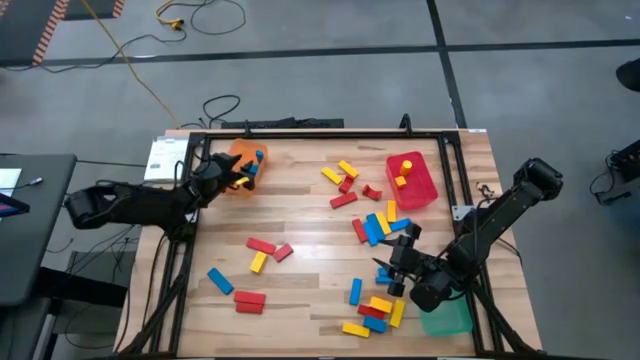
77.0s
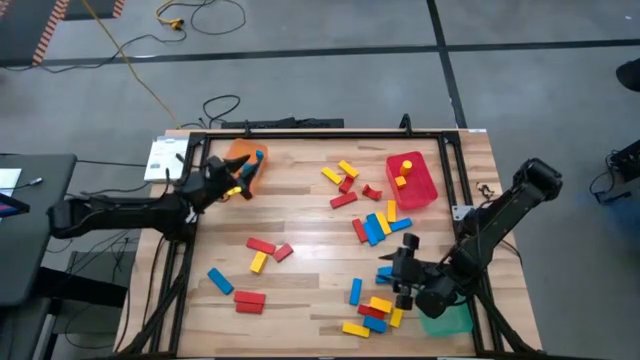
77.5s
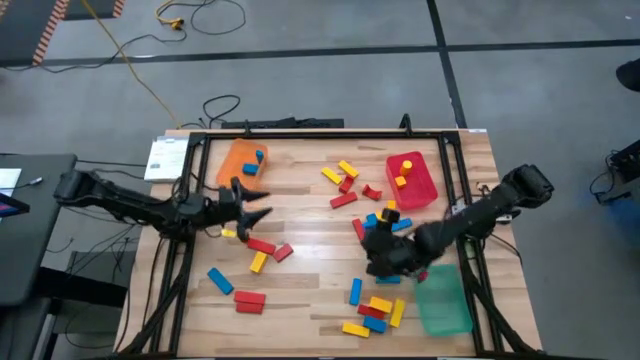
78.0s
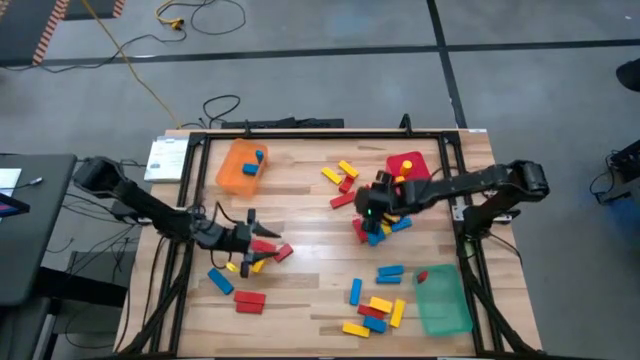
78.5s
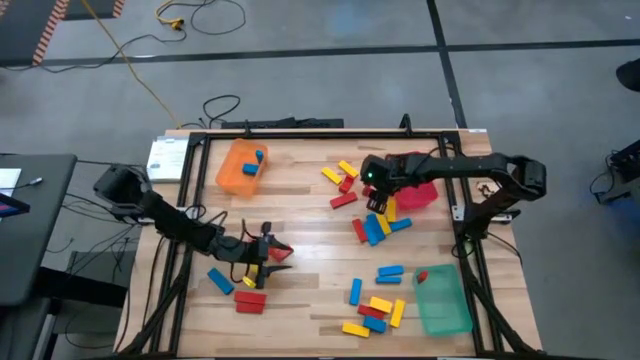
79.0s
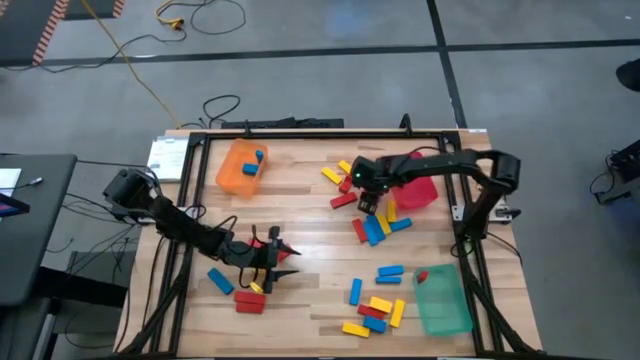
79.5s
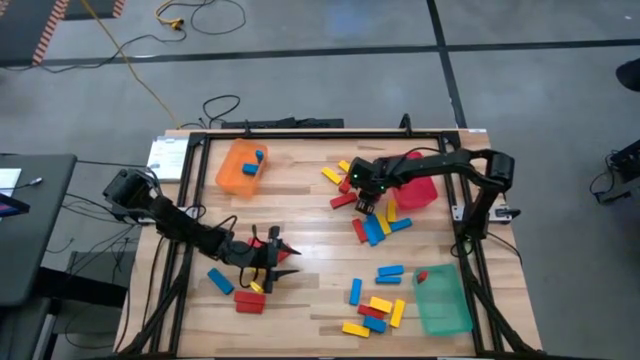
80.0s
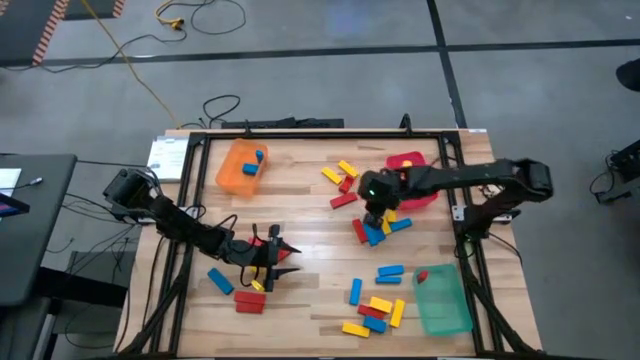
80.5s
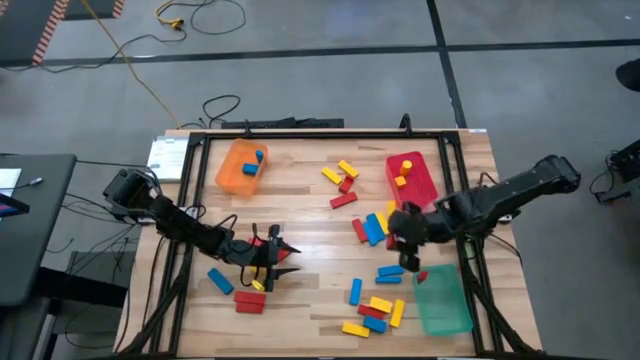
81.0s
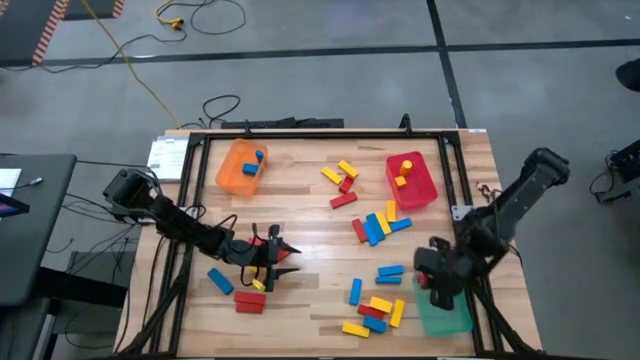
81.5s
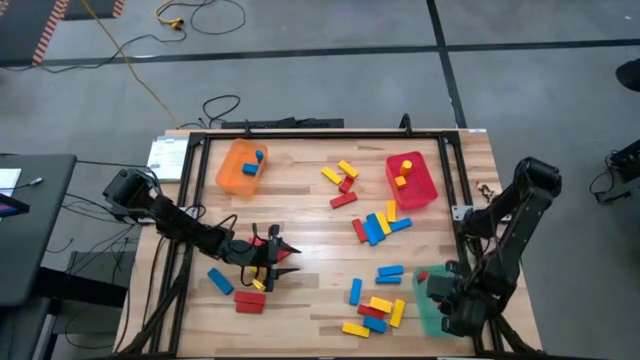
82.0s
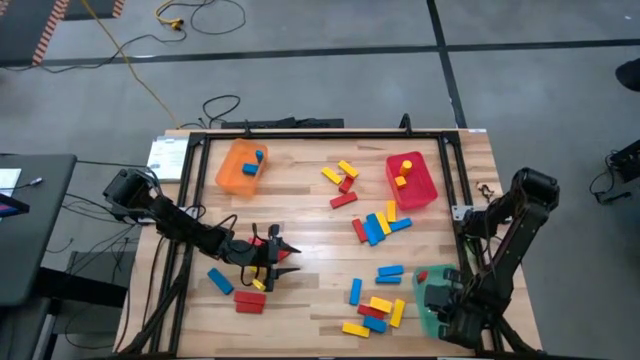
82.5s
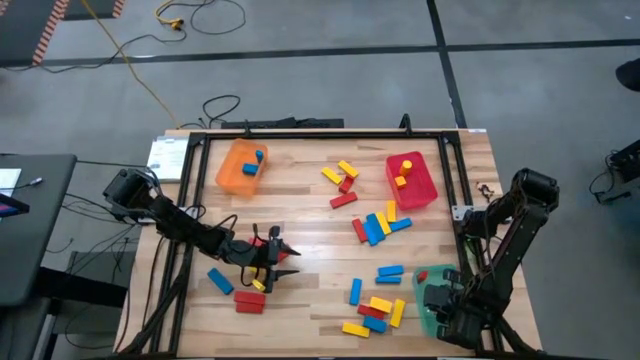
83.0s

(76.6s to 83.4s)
Task: Sort blocks
Put the red arch block into the green bin

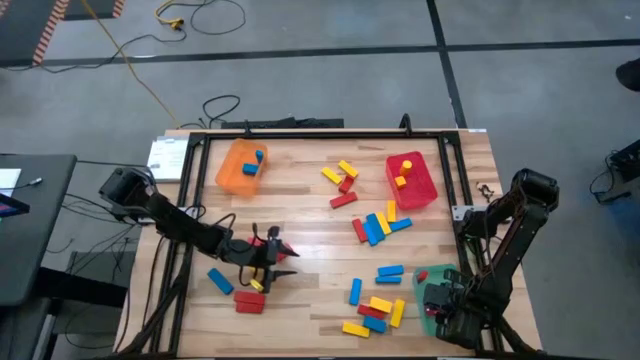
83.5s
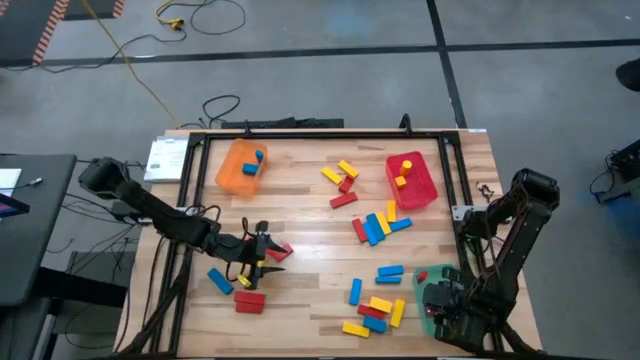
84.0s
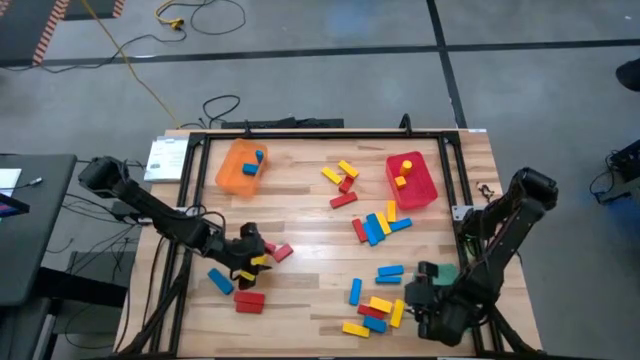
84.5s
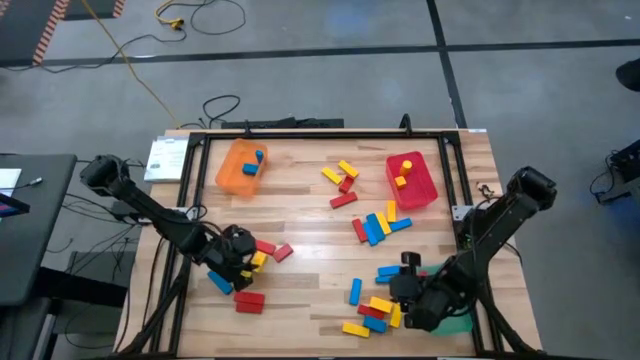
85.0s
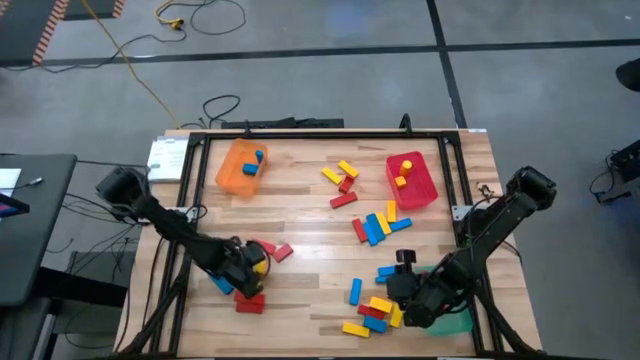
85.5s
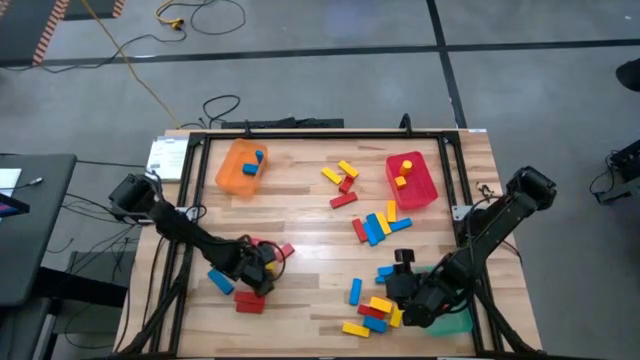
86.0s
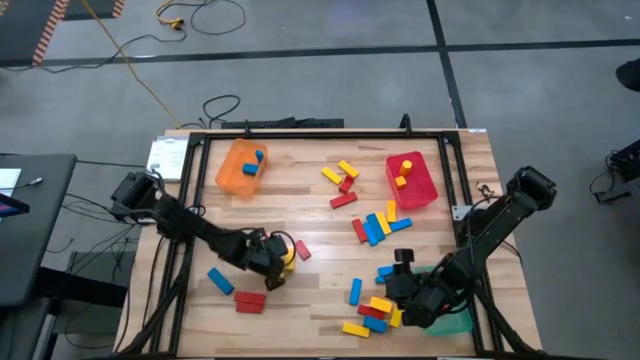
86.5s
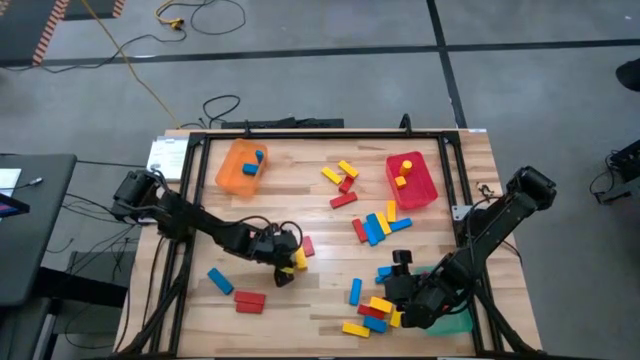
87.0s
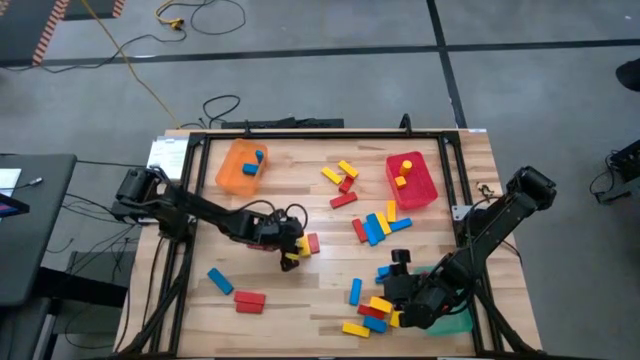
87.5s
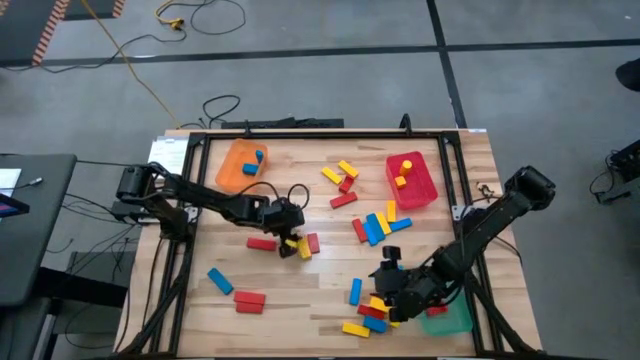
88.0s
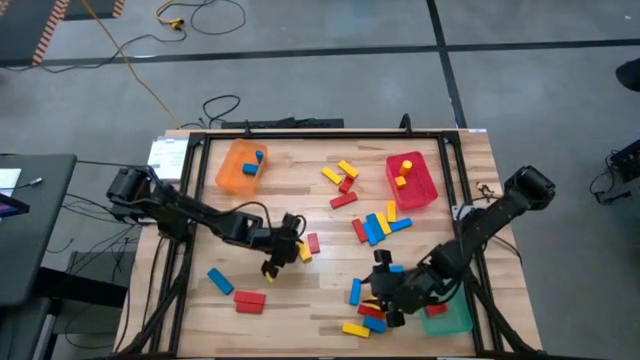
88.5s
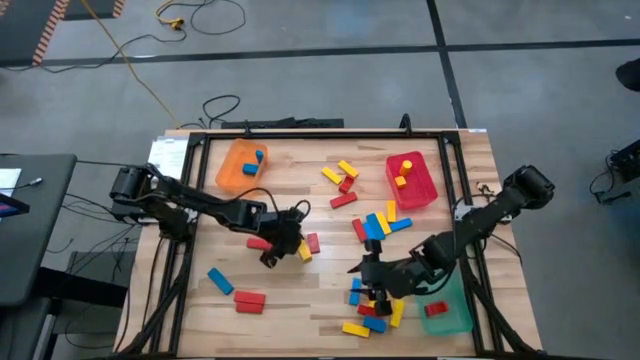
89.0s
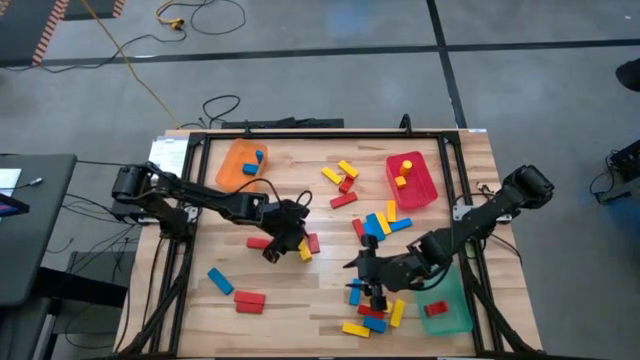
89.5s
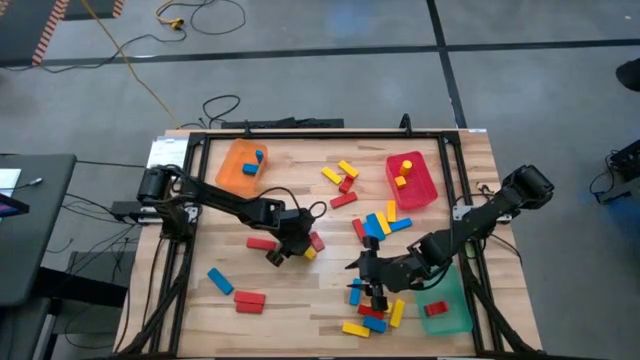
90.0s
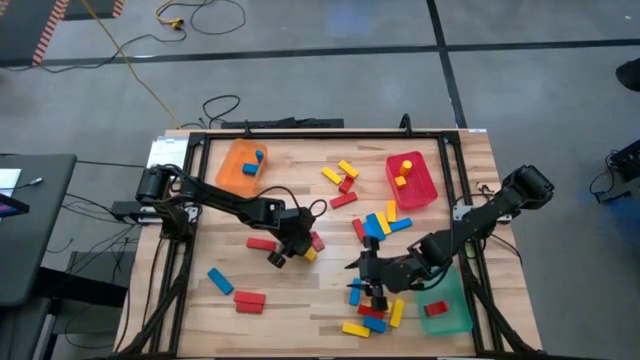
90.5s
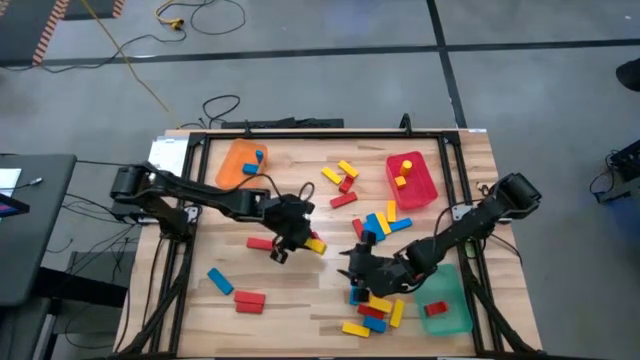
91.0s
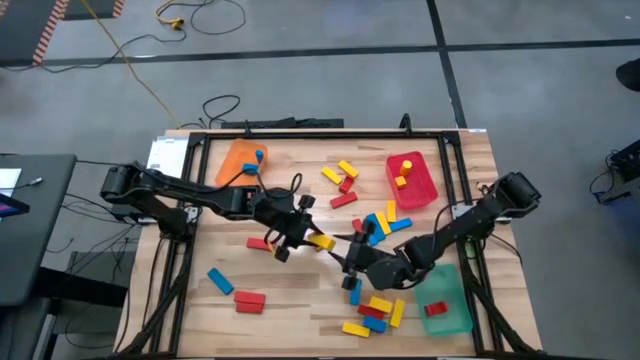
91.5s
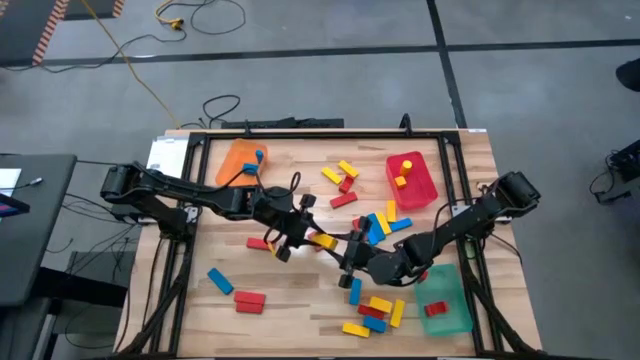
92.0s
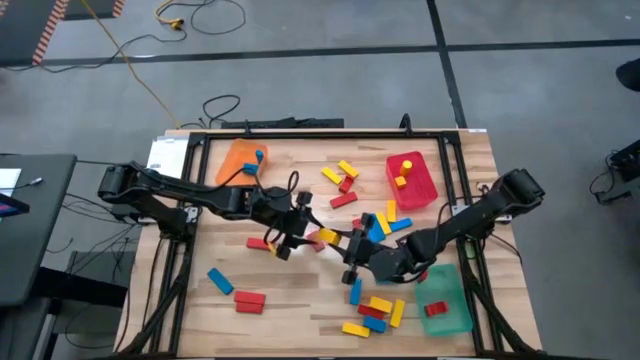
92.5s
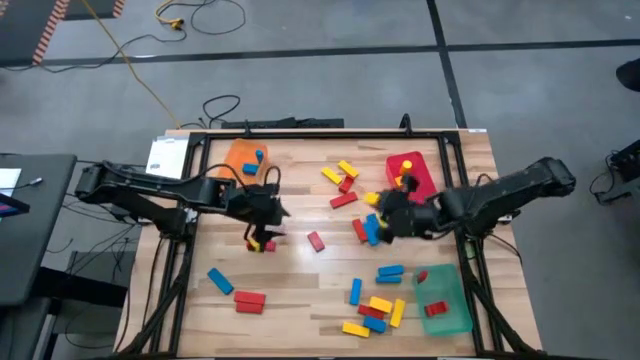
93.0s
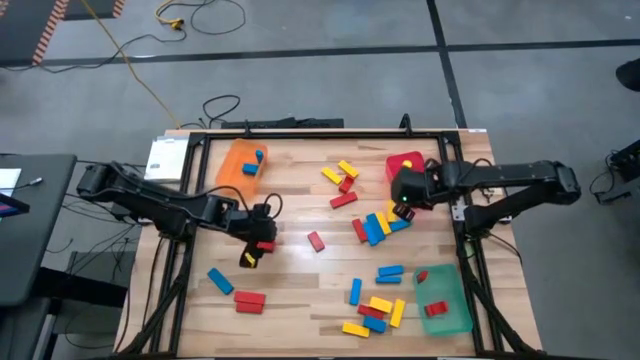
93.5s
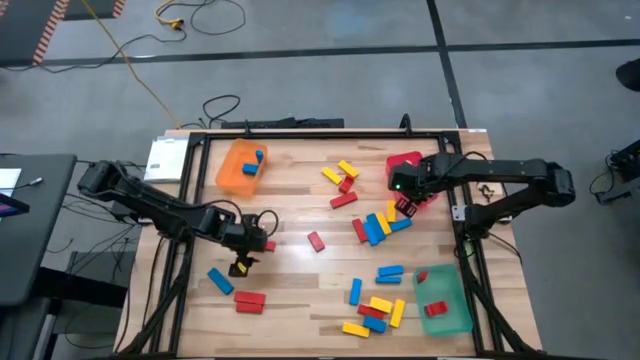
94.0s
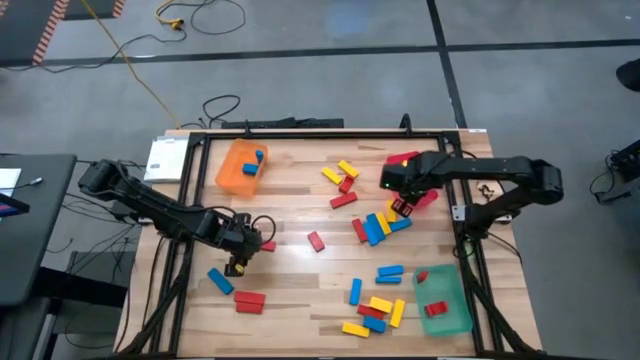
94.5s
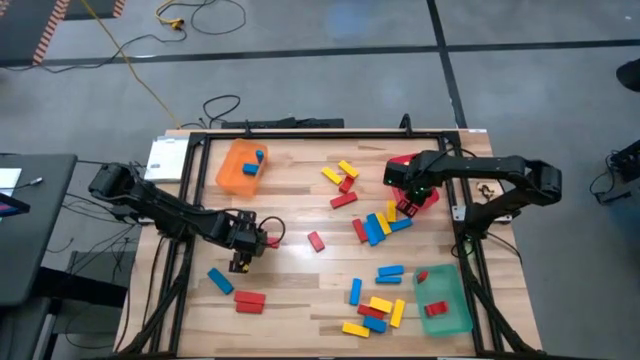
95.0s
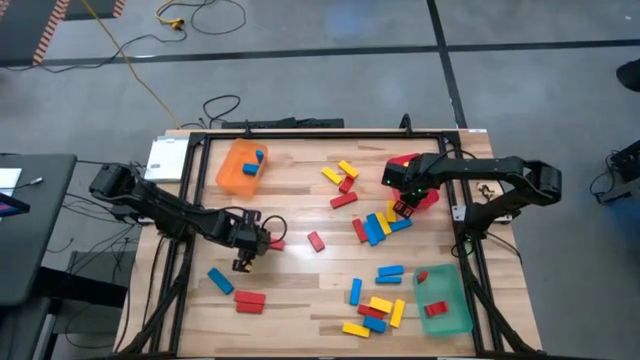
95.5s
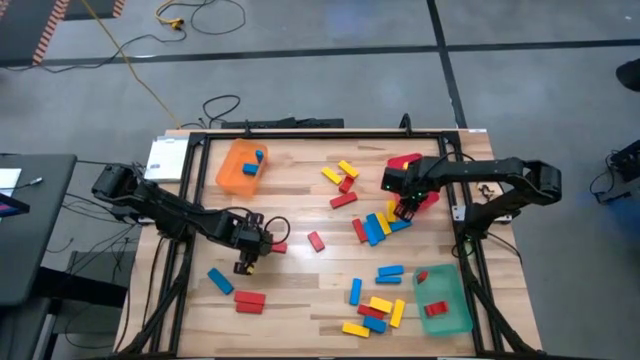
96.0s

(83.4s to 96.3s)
Put the yellow rectangle block into the red bin

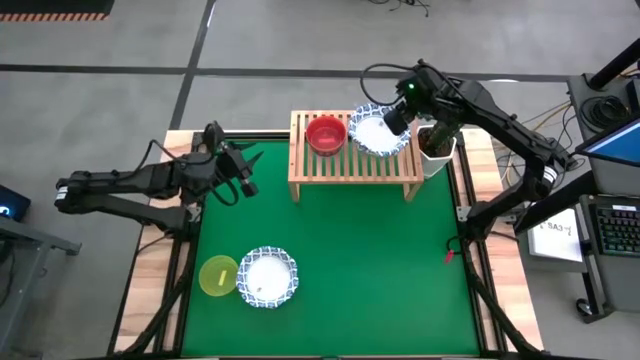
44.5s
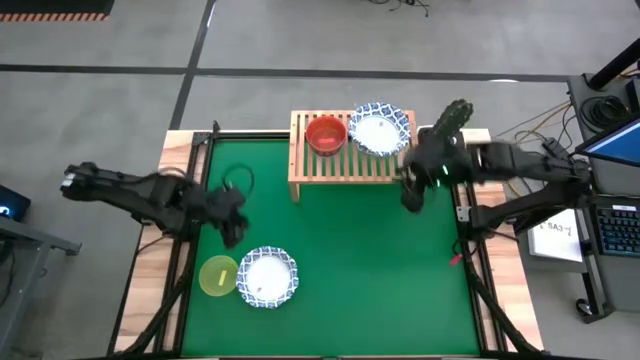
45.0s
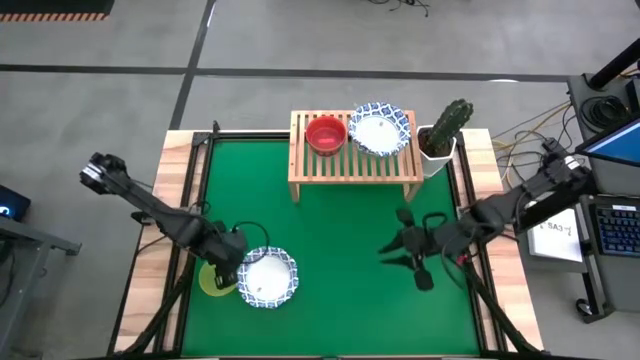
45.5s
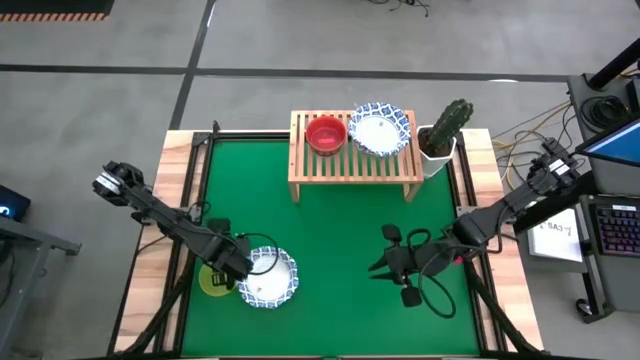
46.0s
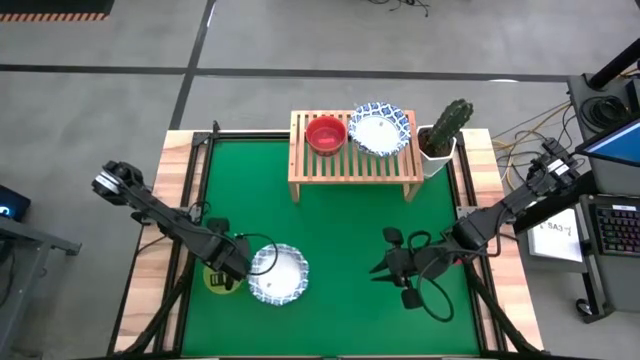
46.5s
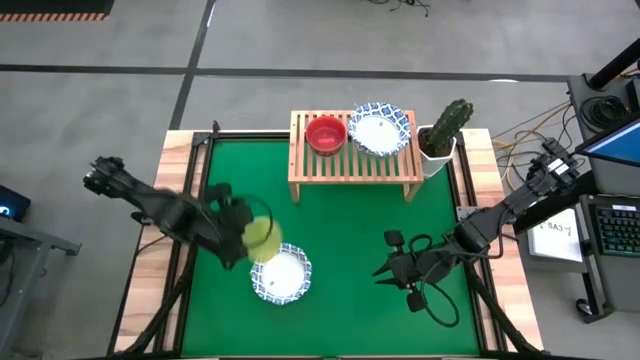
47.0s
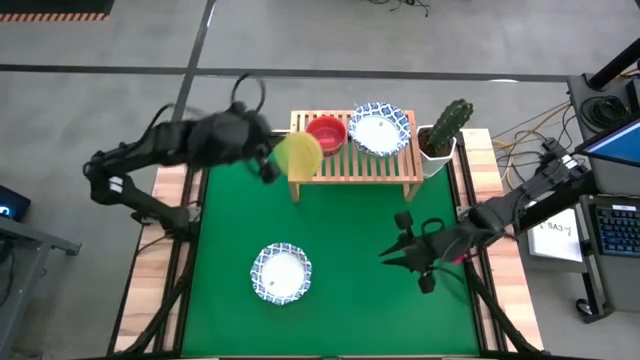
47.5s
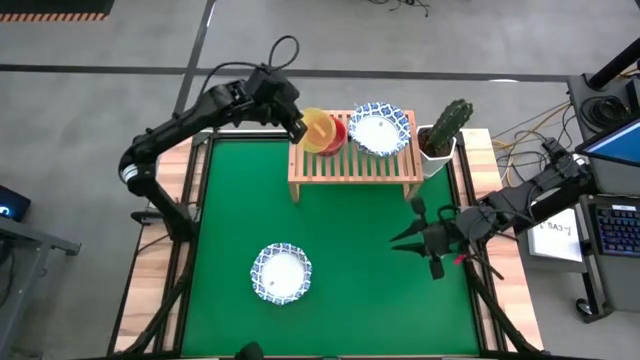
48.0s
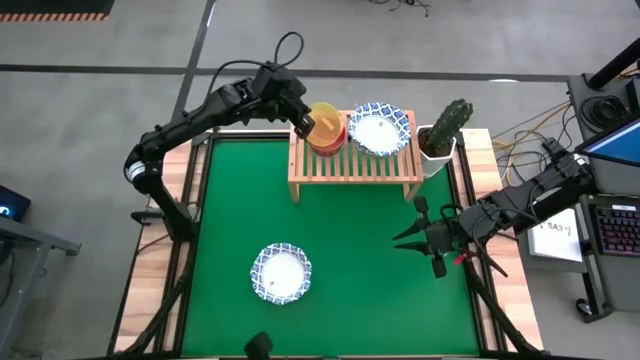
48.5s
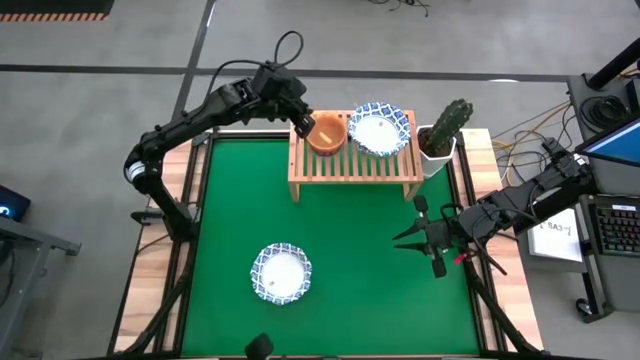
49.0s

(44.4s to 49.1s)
Task: Place and stack bowls onto a shelf
Stack the small yellow bowl on the small orange bowl on the shelf
